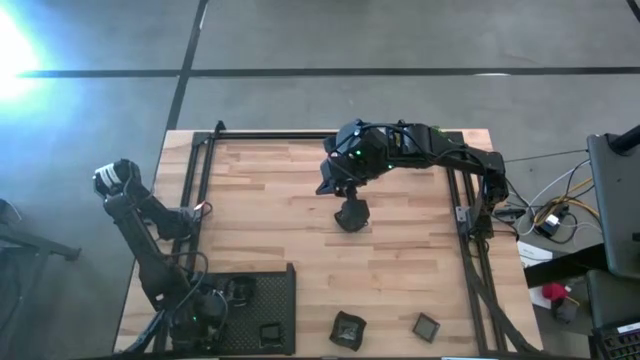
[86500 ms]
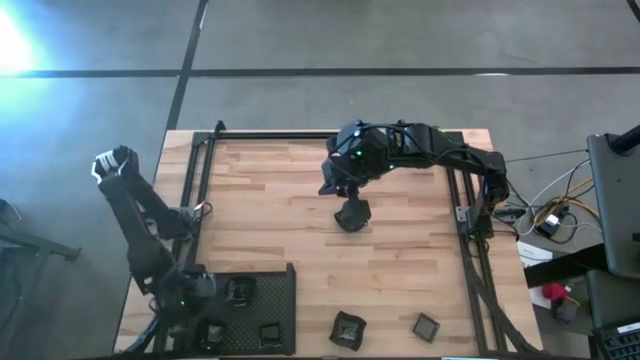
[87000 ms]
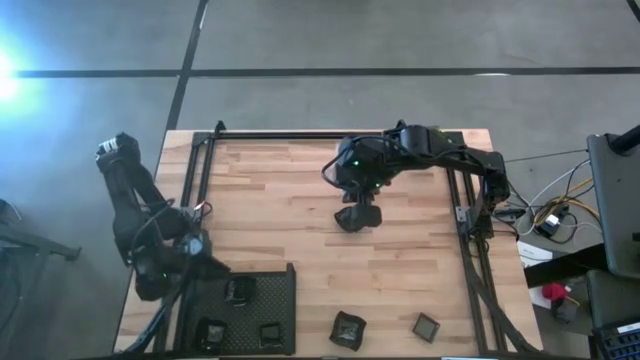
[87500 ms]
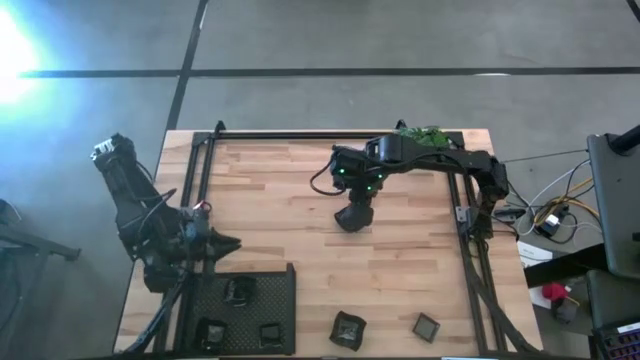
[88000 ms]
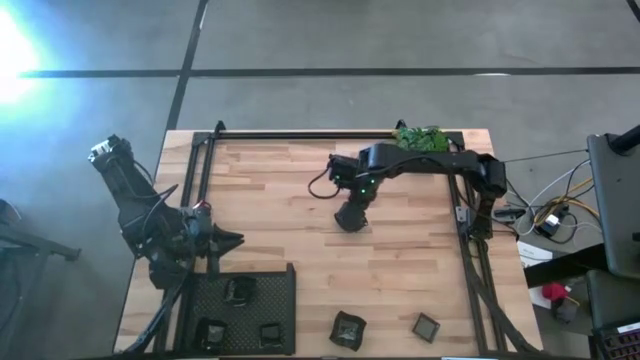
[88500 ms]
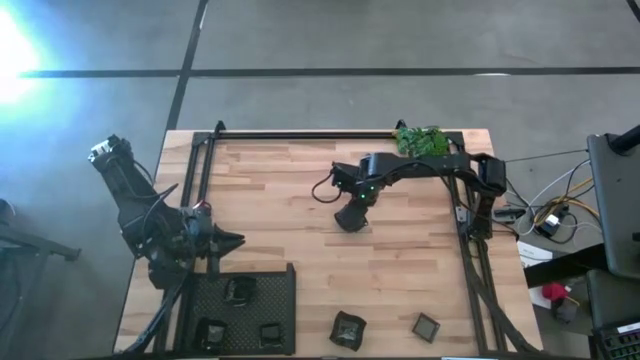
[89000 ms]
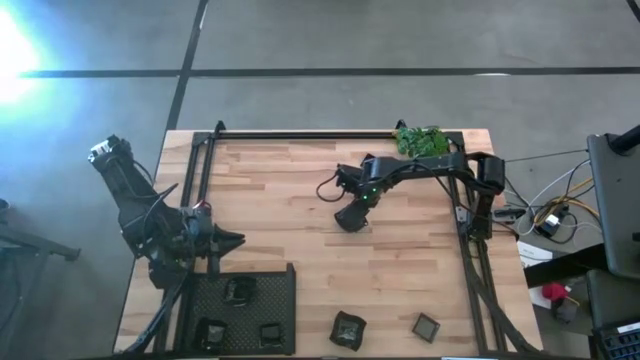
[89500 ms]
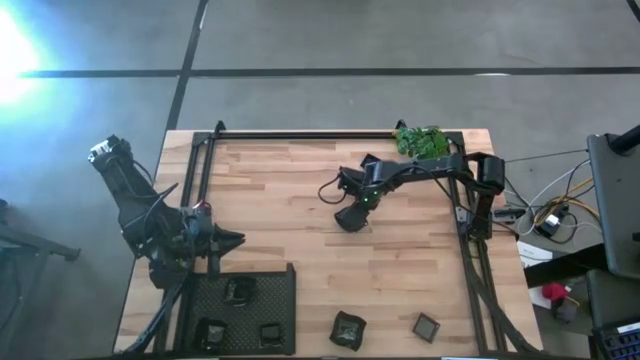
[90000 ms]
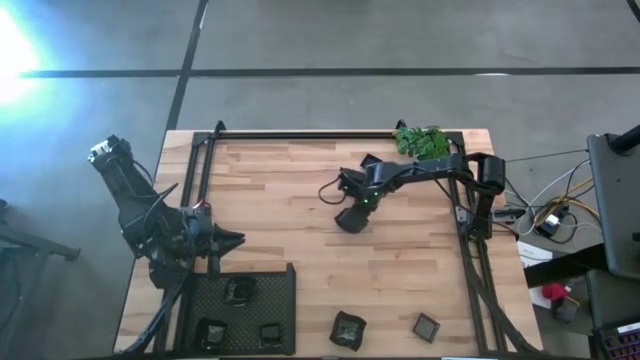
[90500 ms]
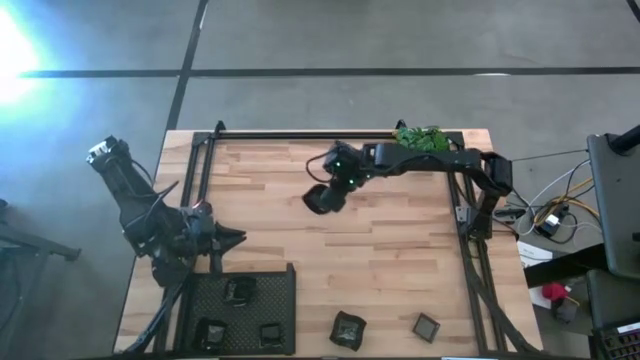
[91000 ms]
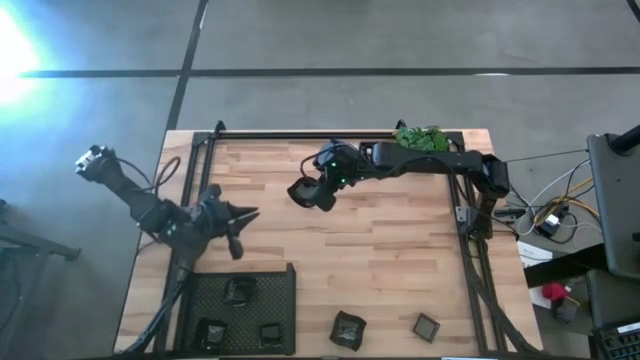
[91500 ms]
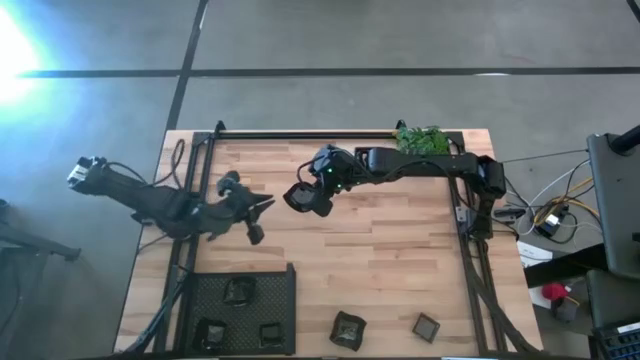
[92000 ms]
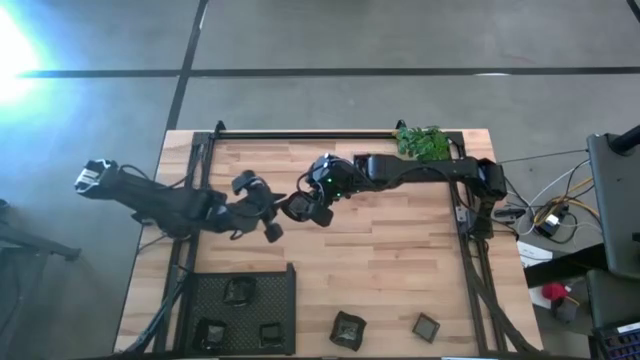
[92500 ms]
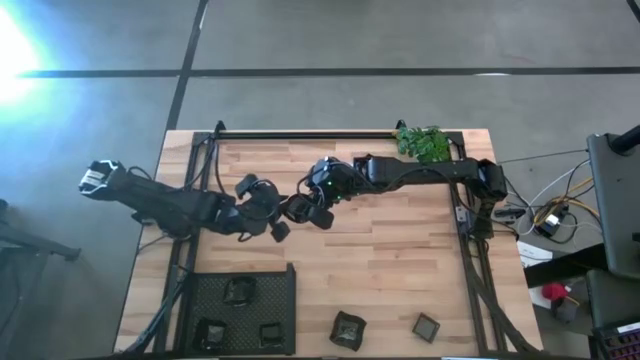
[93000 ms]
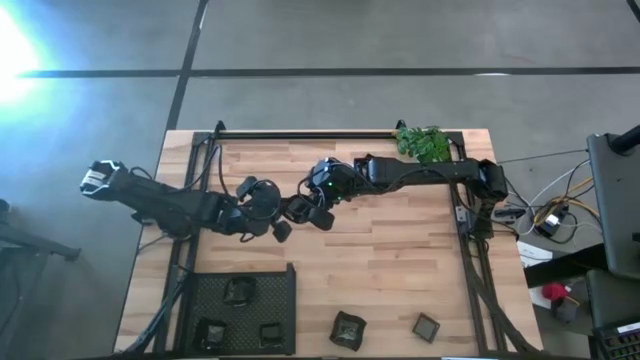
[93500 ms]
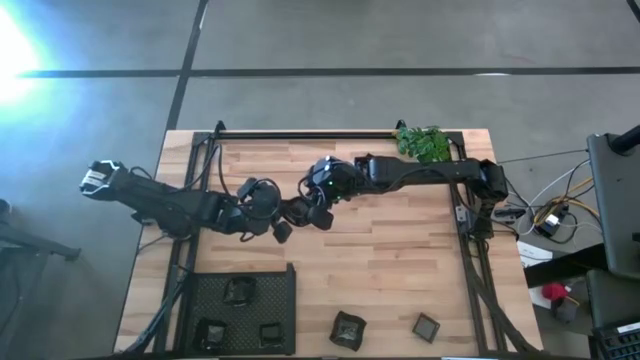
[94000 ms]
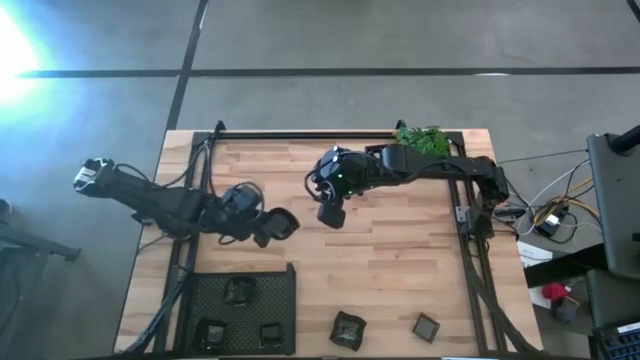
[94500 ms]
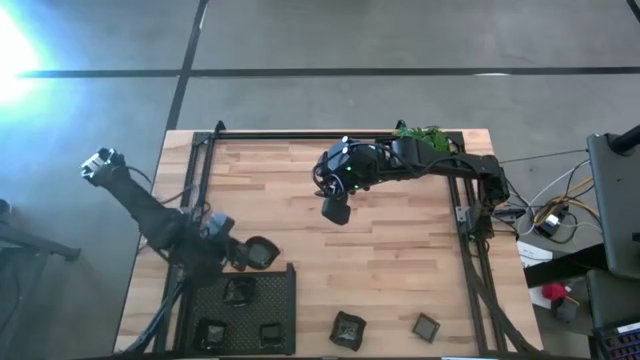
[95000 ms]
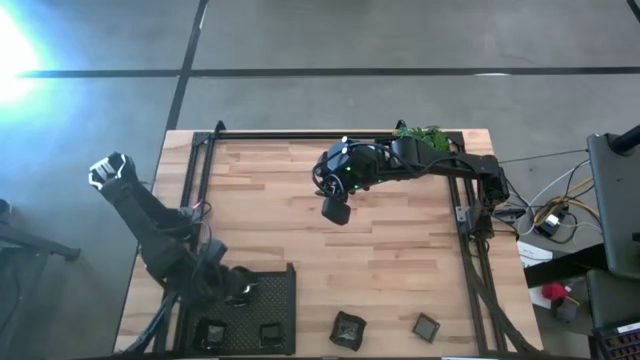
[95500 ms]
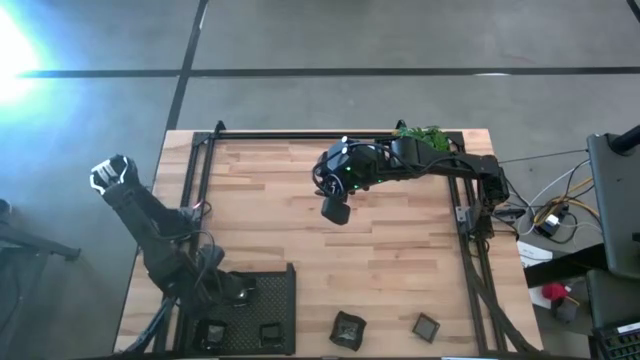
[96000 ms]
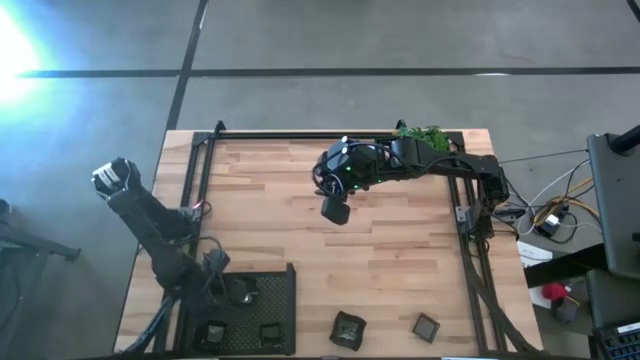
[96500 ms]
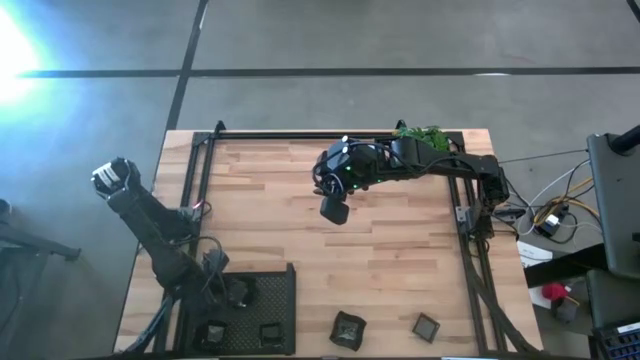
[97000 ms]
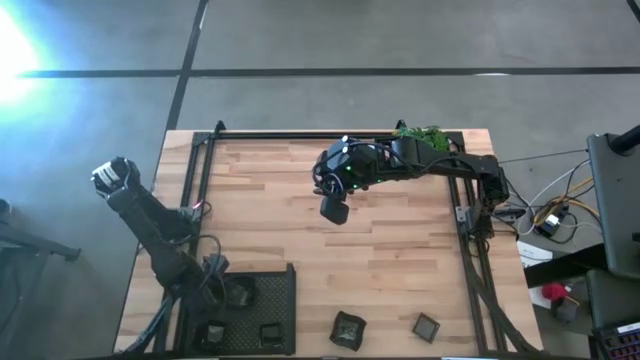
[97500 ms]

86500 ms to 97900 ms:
Task: Pick & Place Mini shaped plates
Stack the black leaf-shaped plate on the black leaf-shaped plate on the shelf

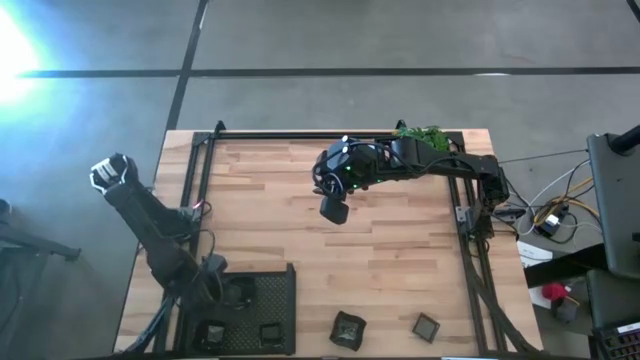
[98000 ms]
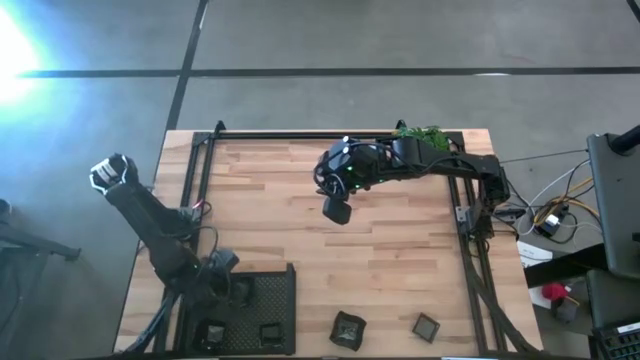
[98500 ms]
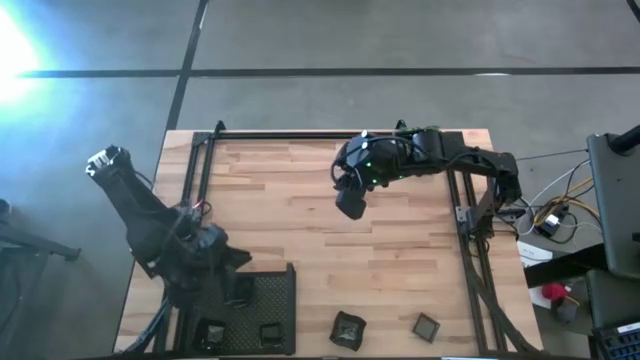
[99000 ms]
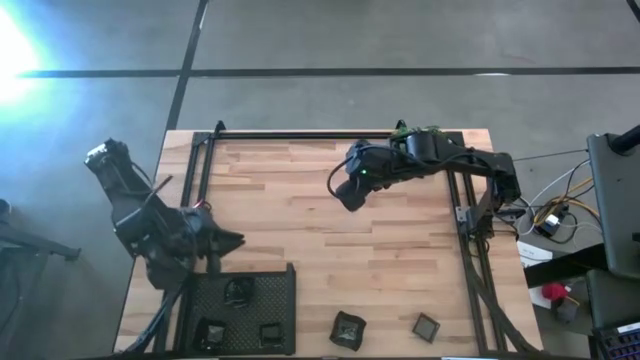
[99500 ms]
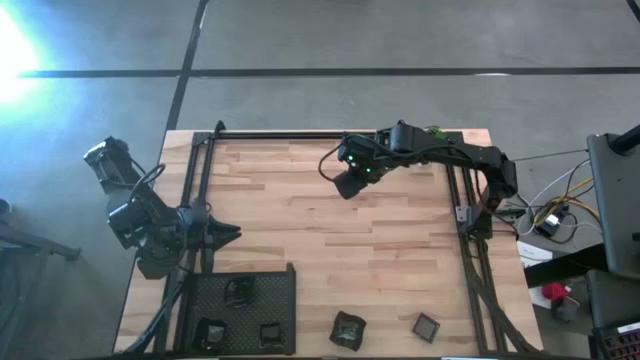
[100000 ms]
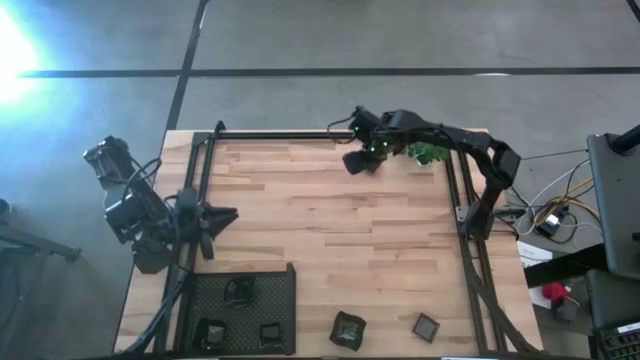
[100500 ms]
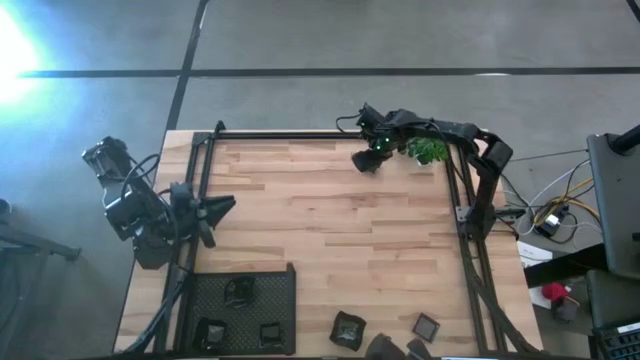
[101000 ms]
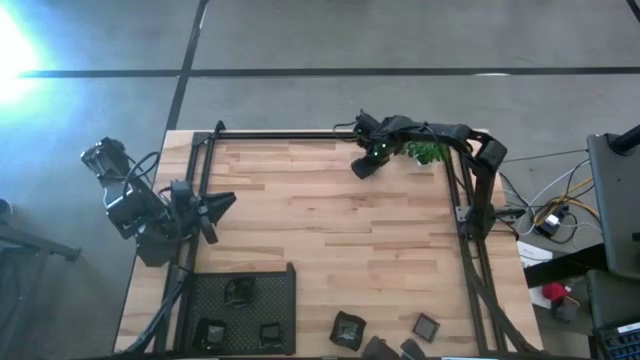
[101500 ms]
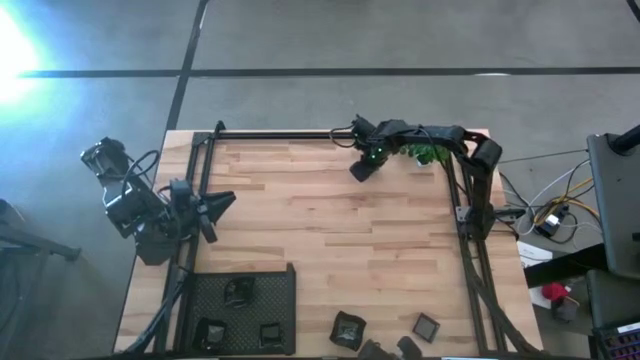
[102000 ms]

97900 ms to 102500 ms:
Stack the black square plate on the black square plate on the shelf

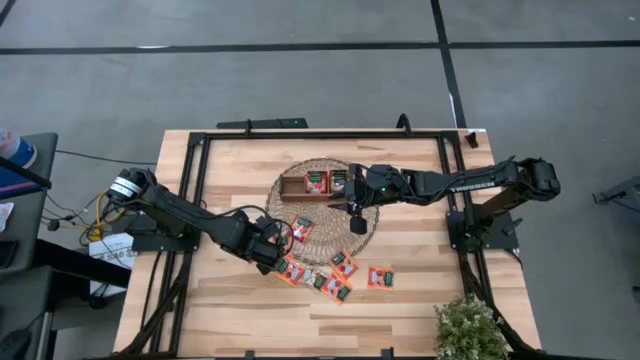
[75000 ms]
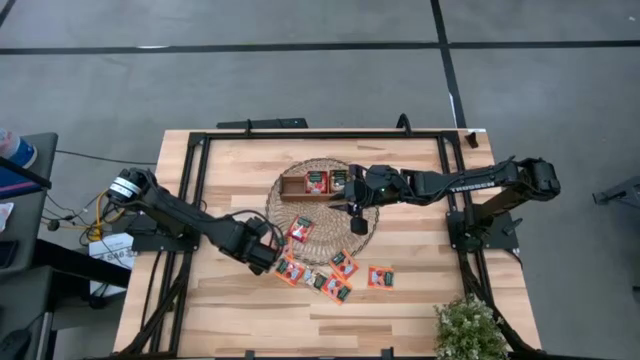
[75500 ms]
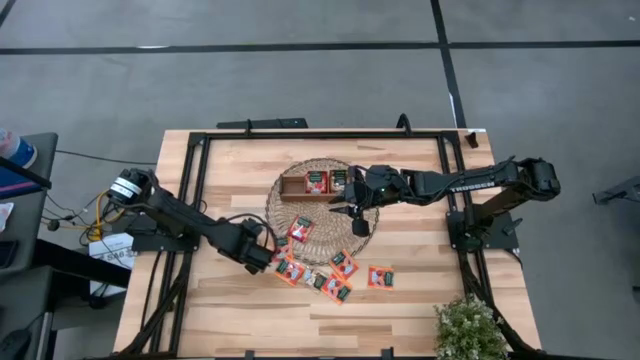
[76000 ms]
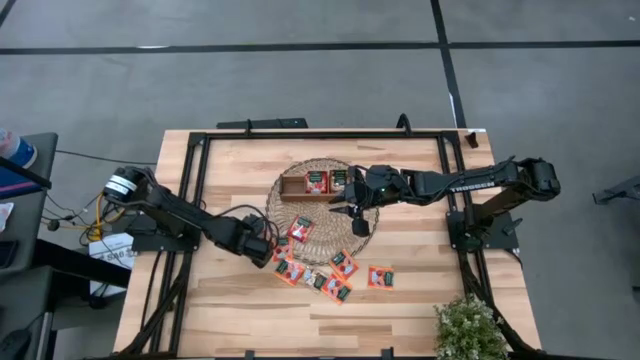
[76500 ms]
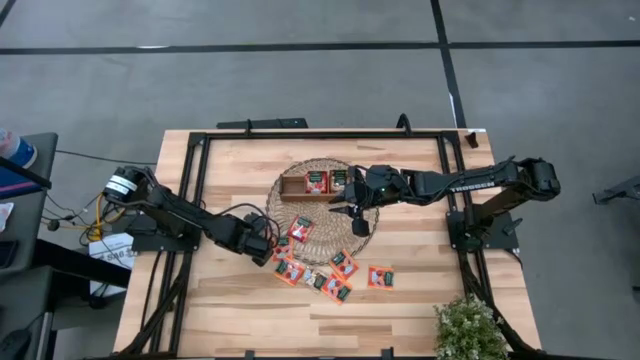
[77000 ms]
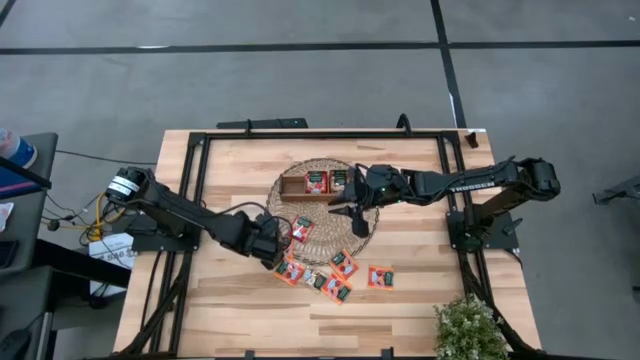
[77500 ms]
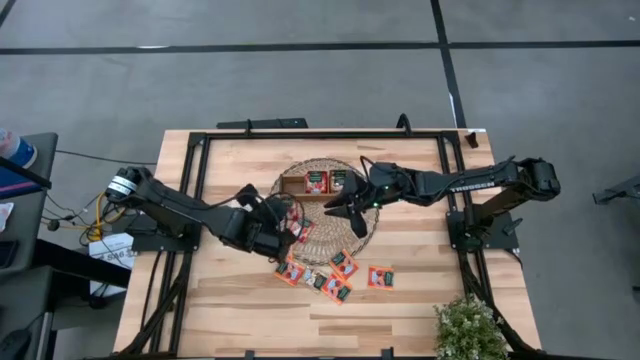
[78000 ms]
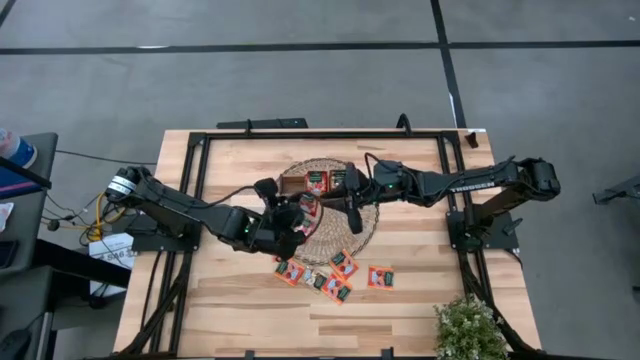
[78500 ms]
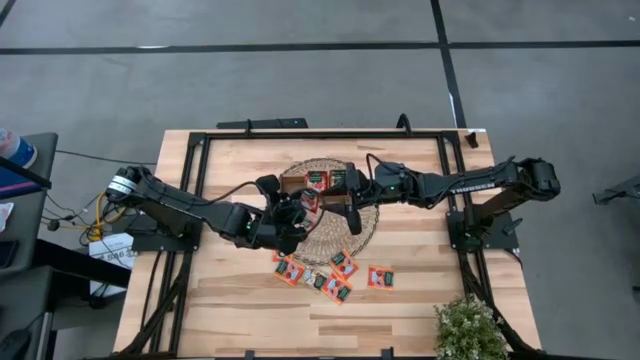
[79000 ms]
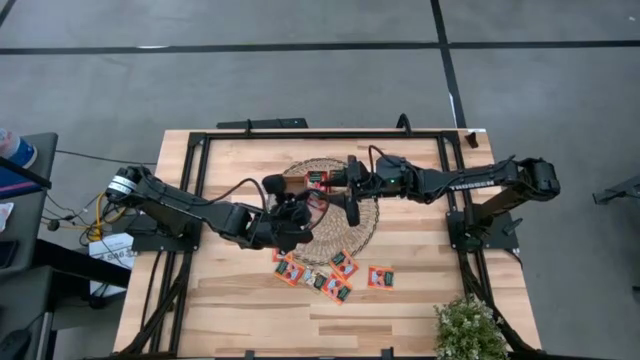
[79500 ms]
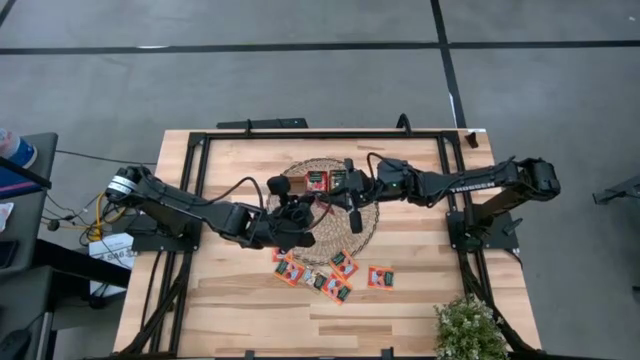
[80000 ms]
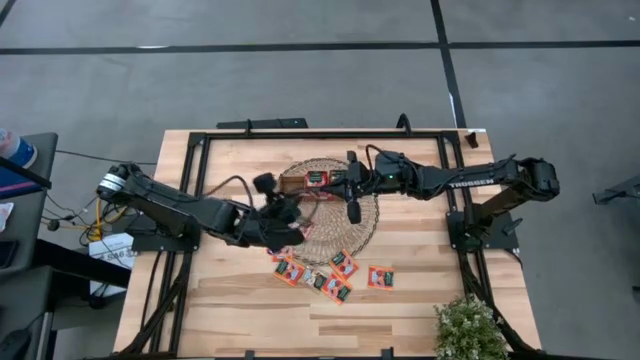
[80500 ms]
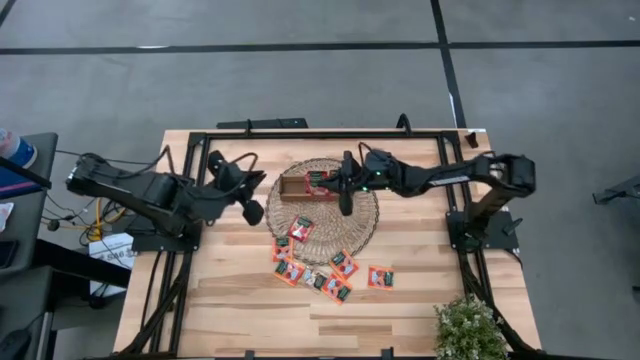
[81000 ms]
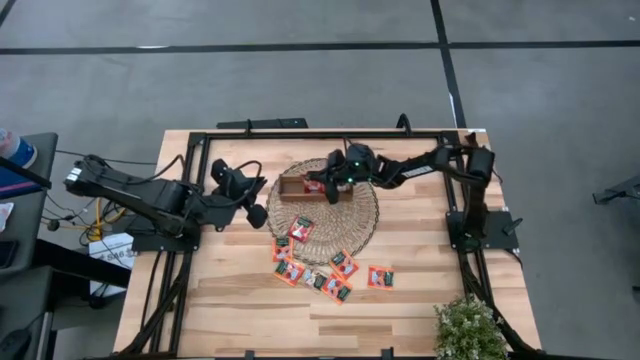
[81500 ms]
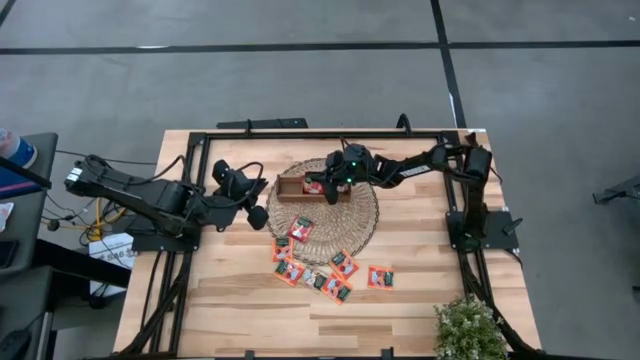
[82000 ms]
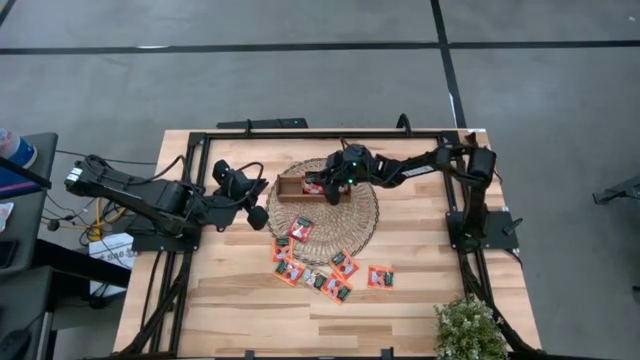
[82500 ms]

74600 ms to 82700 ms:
Task: Pick & Place Tea
Put the left red tea bag into the middle section of the wooden organizer
